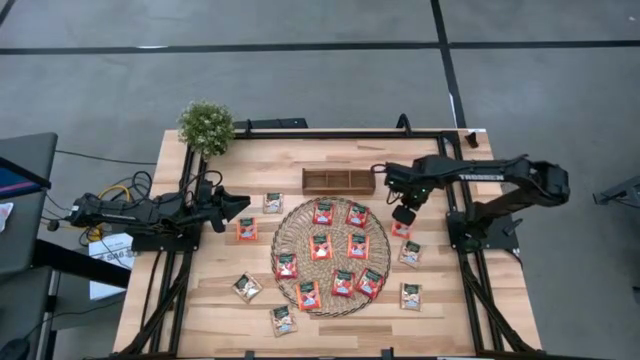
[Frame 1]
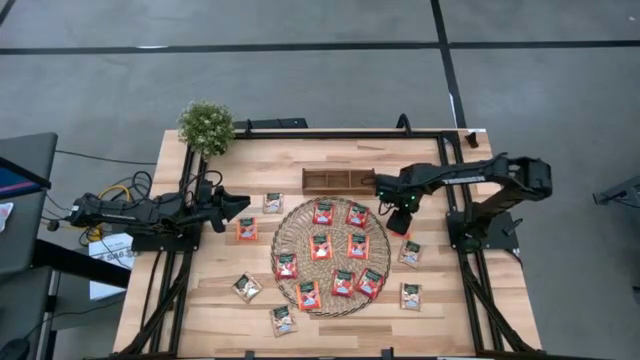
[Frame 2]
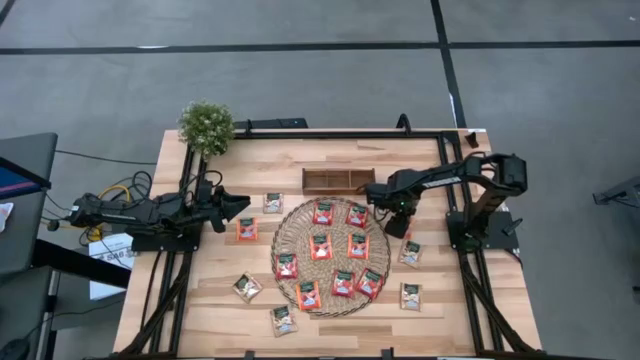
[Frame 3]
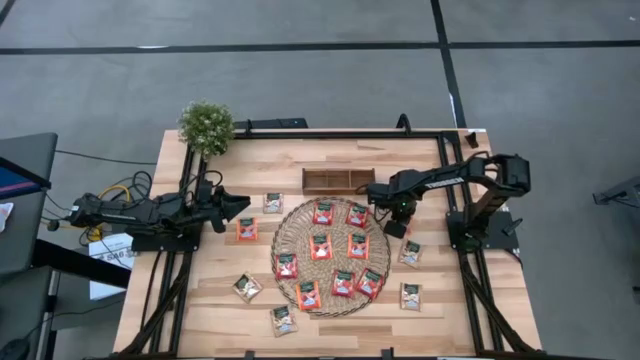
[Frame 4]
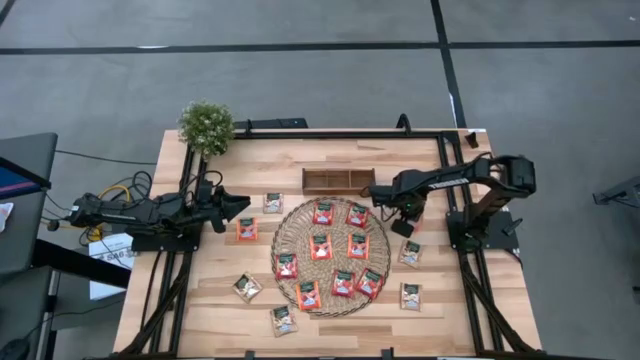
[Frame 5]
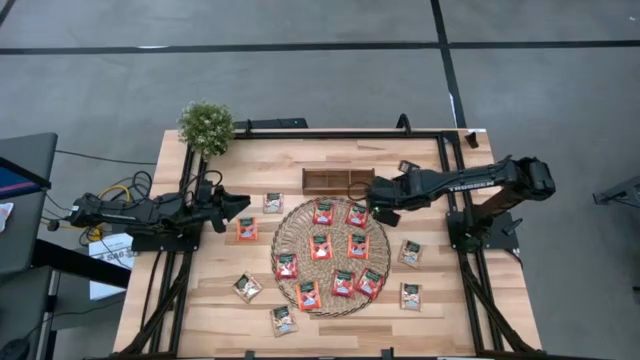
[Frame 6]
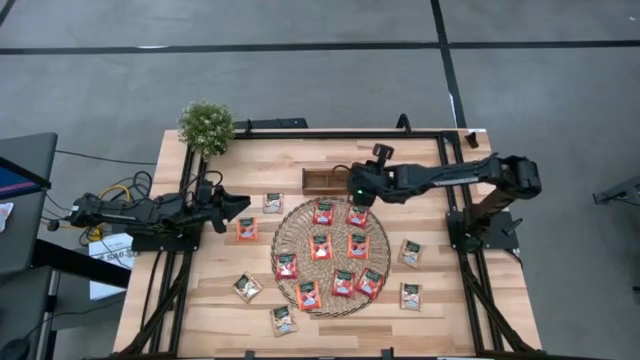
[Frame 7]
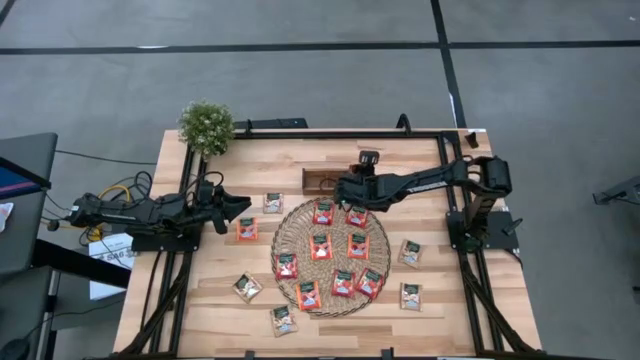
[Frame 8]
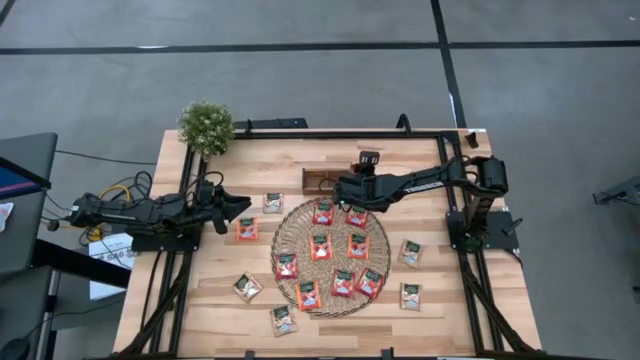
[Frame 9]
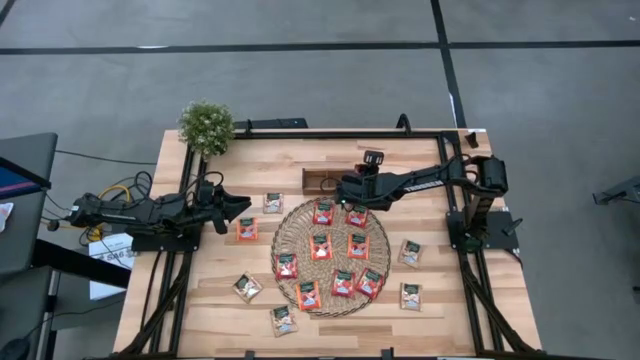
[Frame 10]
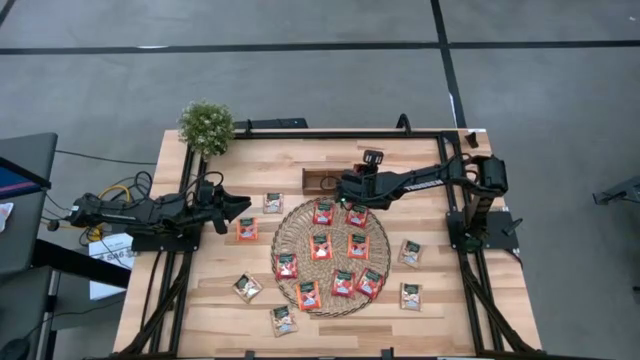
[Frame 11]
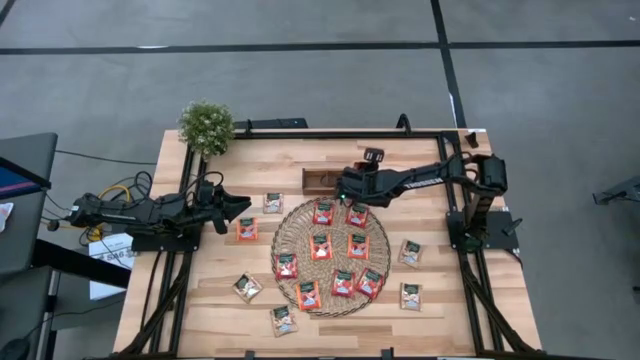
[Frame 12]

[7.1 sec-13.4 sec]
Task: Pick & Place Tea
Put the orange tea bag into the right section of the wooden organizer

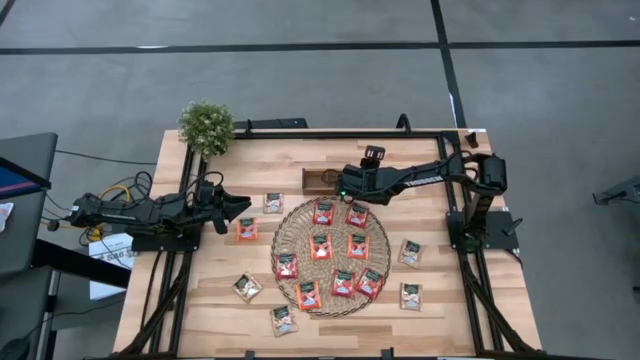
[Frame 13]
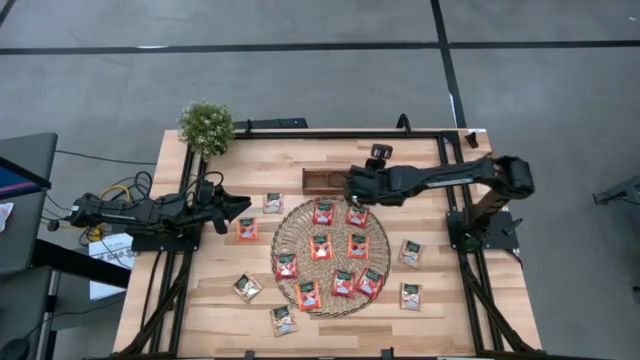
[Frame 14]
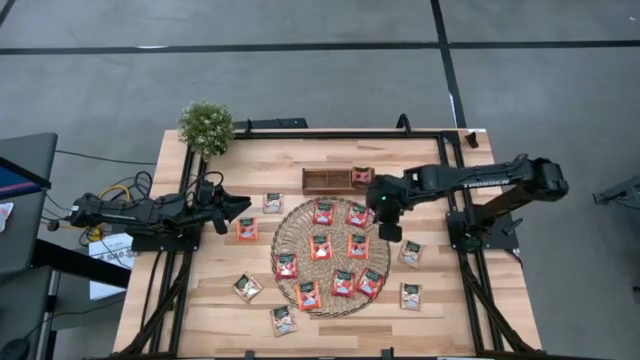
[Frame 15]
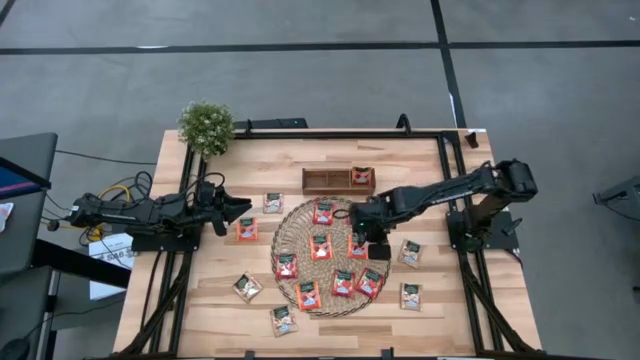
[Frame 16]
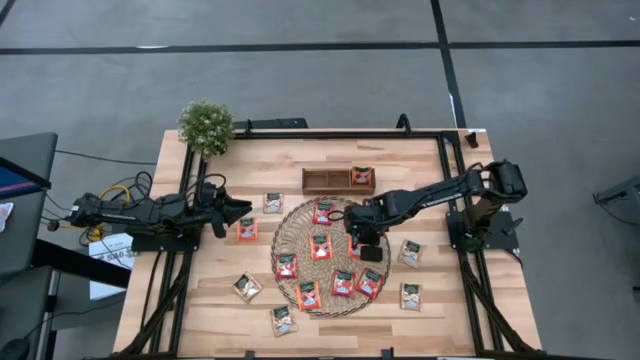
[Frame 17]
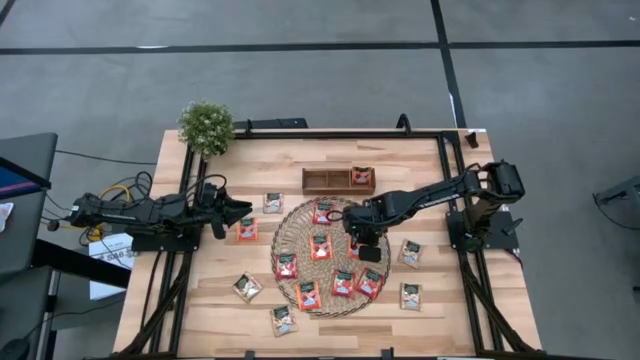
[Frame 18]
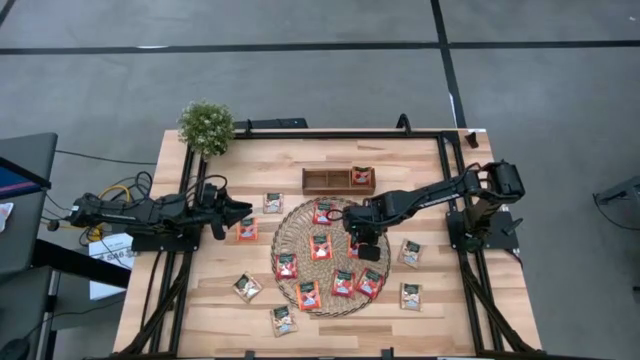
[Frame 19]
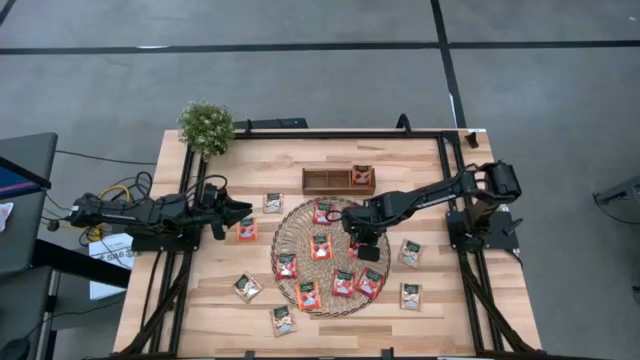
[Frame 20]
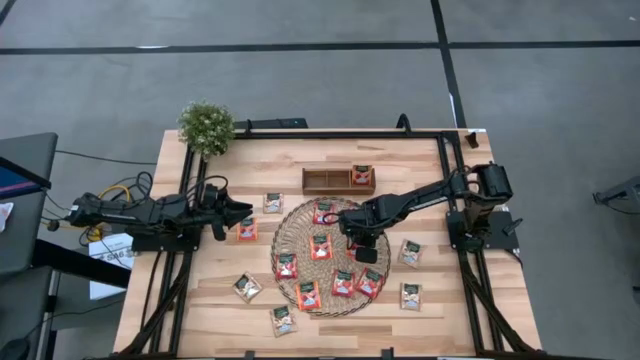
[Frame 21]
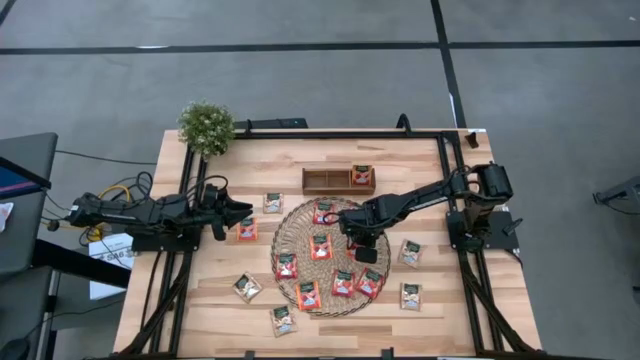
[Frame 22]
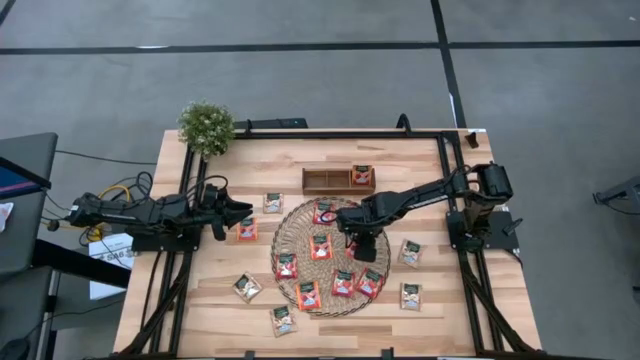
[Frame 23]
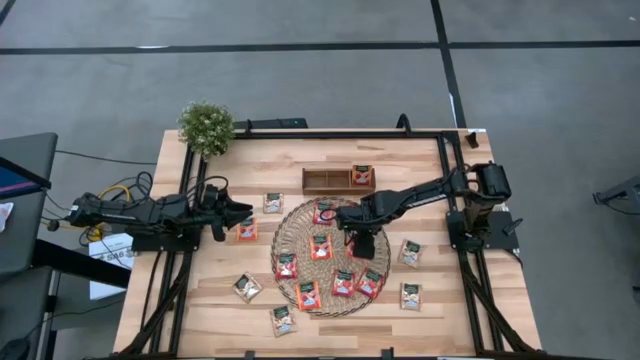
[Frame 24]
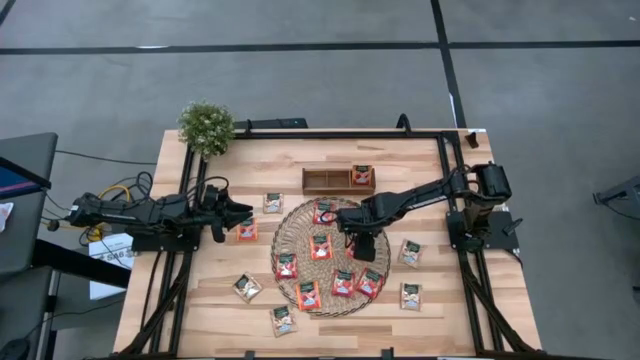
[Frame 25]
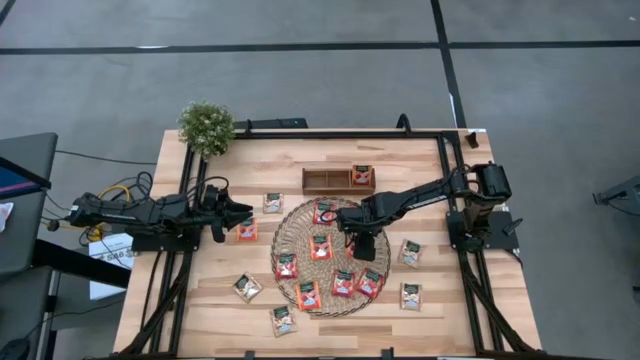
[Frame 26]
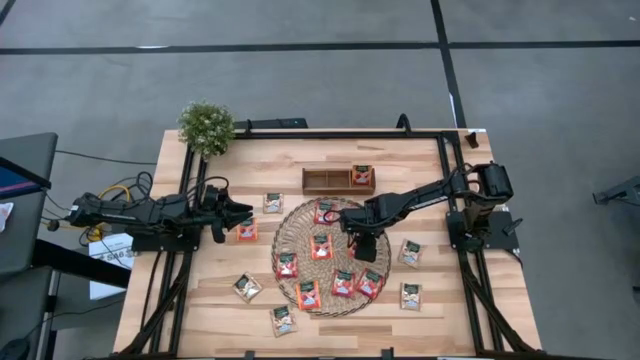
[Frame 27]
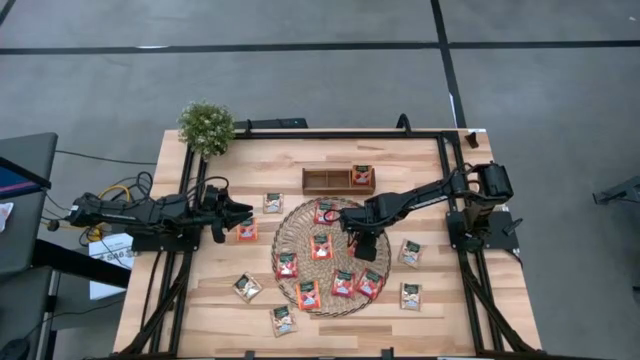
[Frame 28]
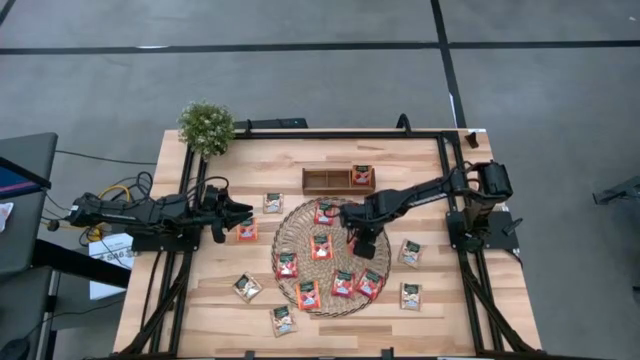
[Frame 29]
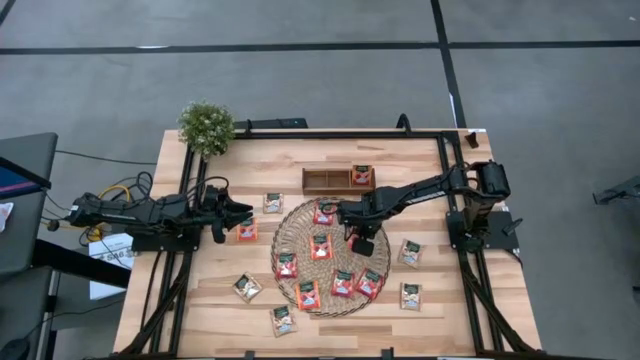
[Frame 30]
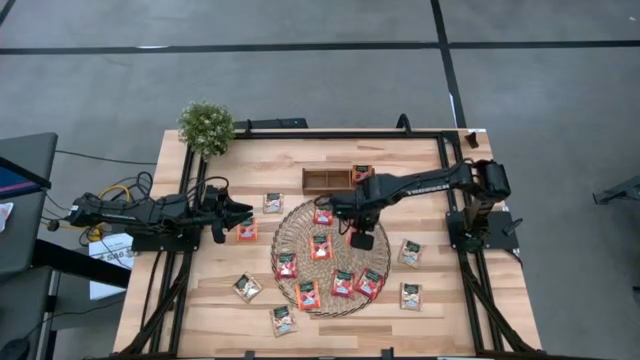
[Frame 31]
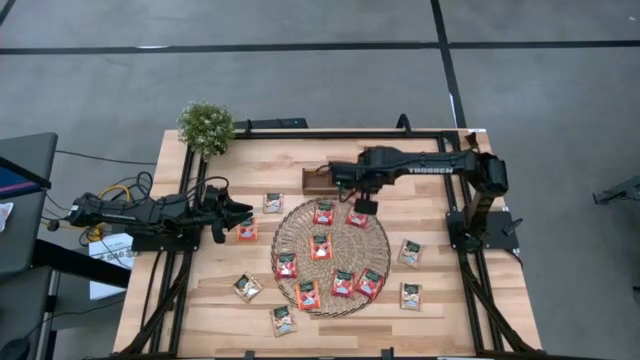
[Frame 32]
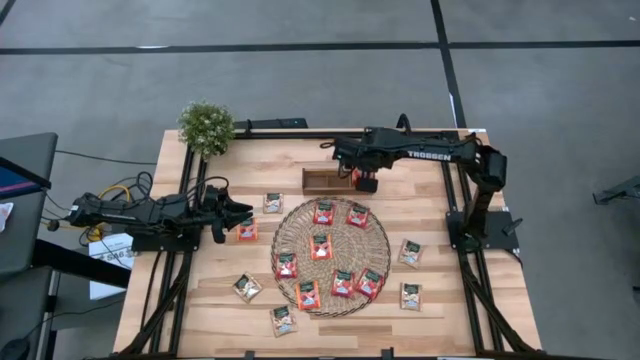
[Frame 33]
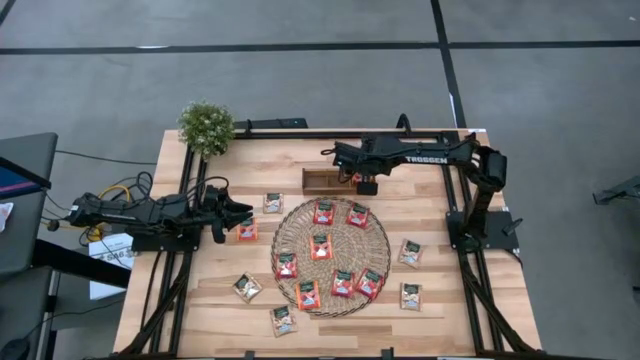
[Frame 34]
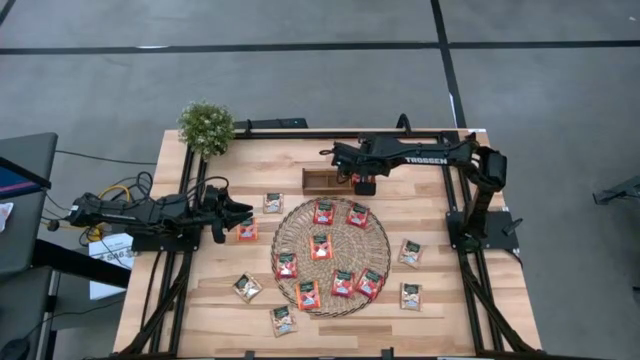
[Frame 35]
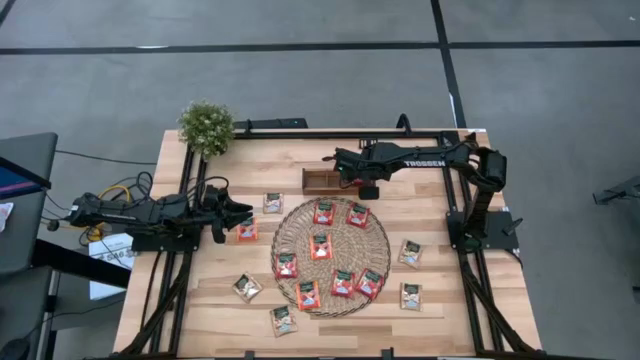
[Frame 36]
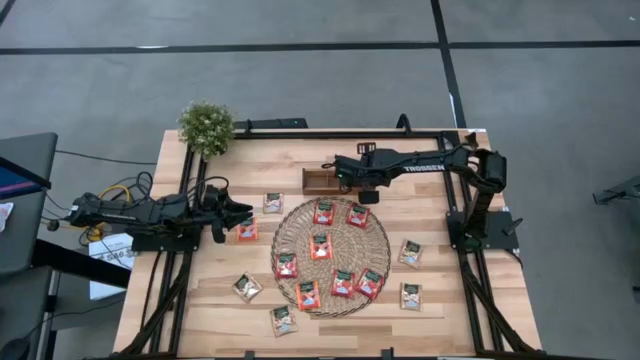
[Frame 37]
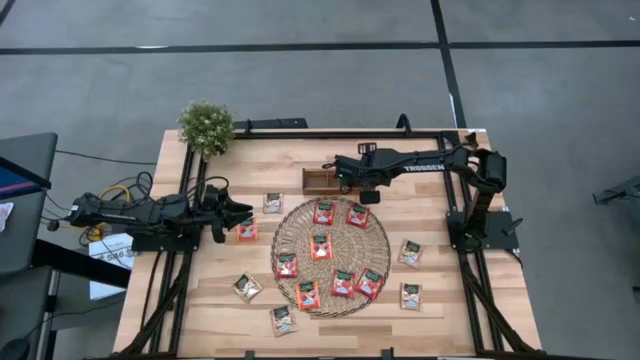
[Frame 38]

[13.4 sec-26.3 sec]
Put the orange tea bag into the right section of the wooden organizer

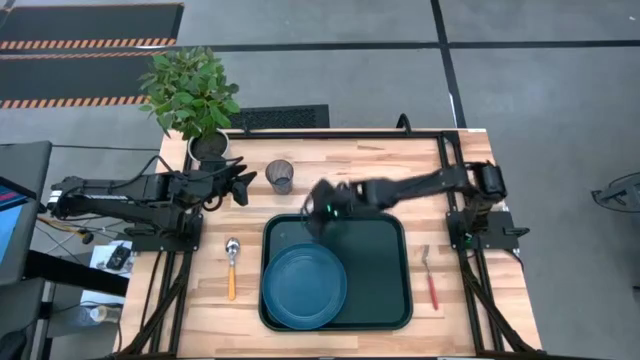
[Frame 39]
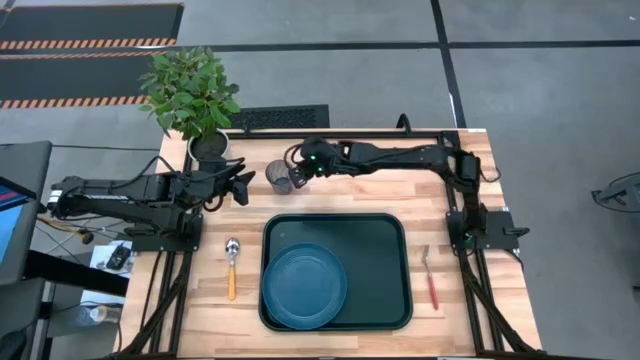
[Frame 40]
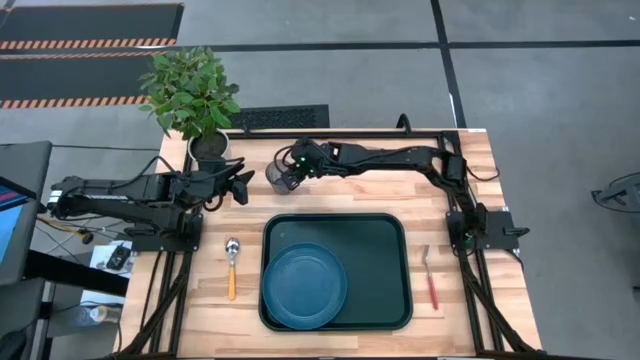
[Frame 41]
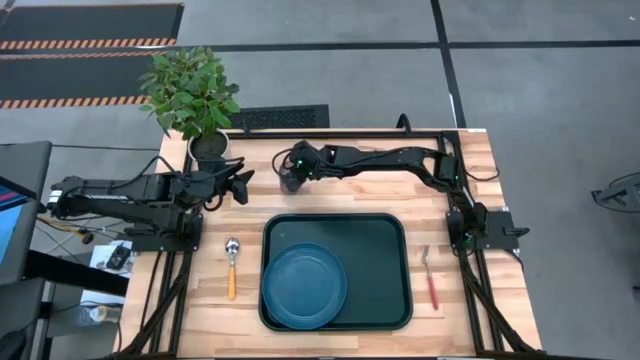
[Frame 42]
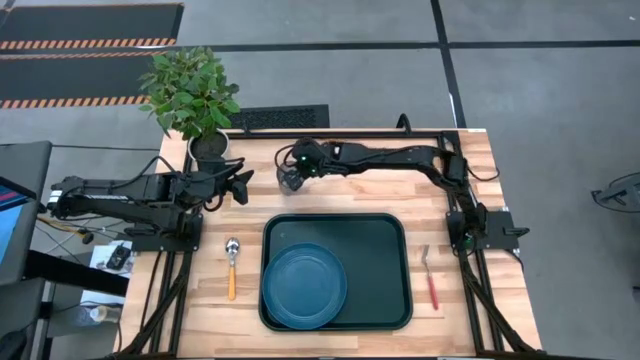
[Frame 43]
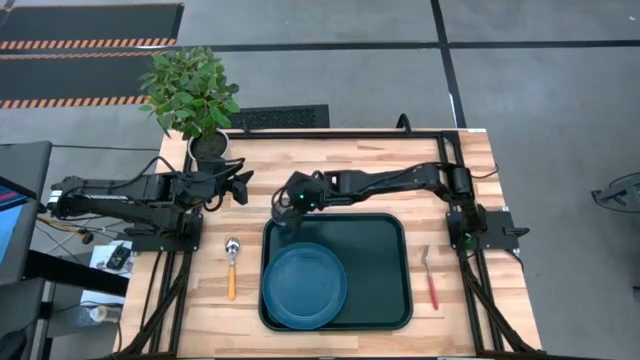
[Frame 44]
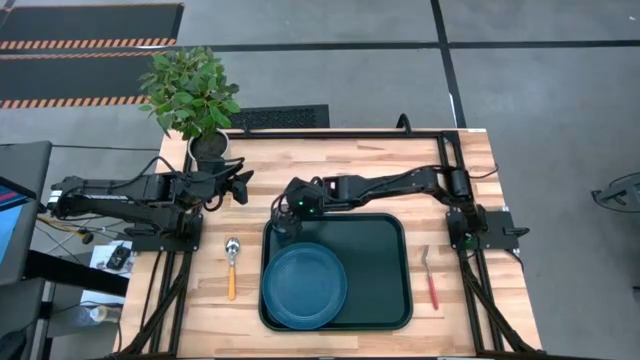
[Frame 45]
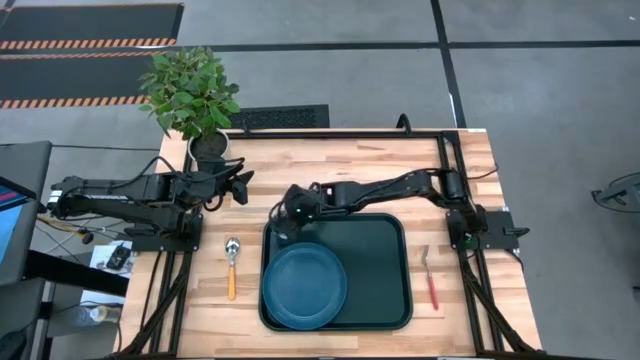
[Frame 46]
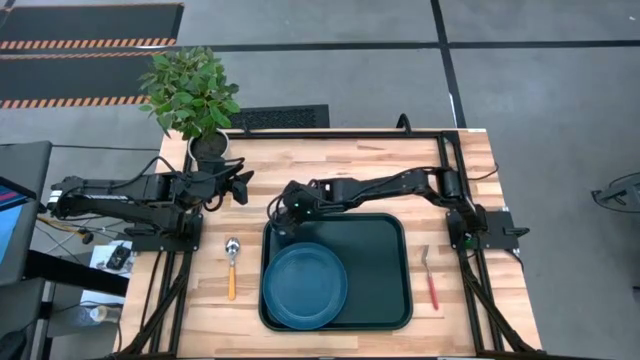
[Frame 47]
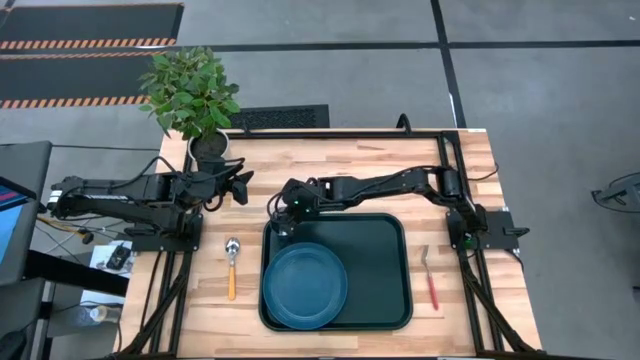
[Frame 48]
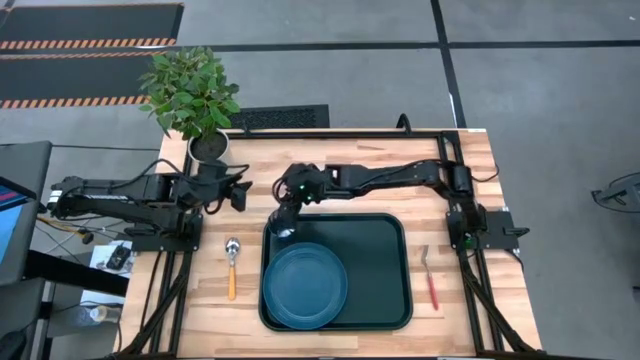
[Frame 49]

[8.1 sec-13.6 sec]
Task: Pick and place plate/cup/fork/spoon on tray
Put the blue glass on the black serving tray to the top left of the blue plate
